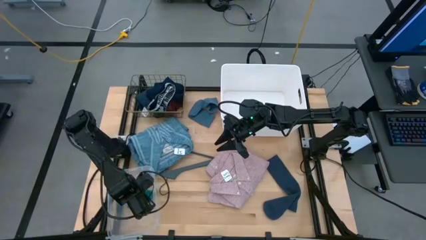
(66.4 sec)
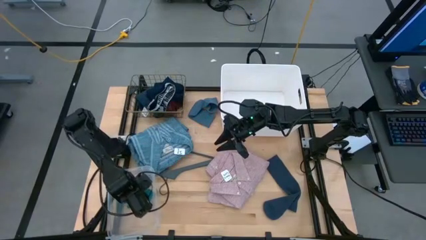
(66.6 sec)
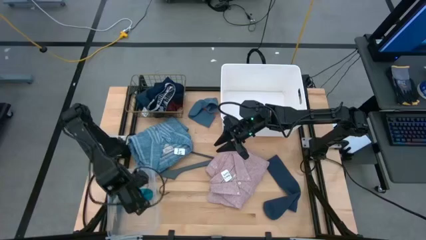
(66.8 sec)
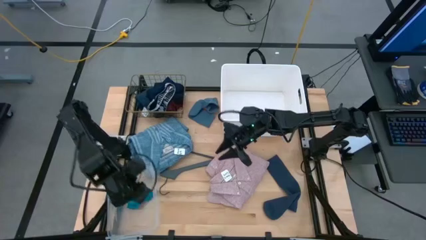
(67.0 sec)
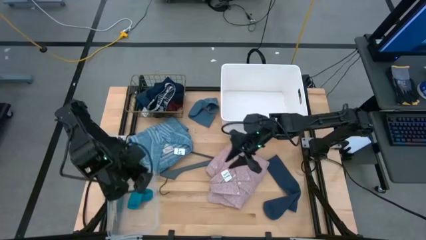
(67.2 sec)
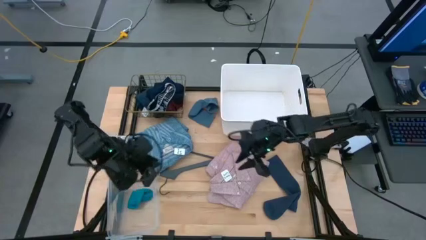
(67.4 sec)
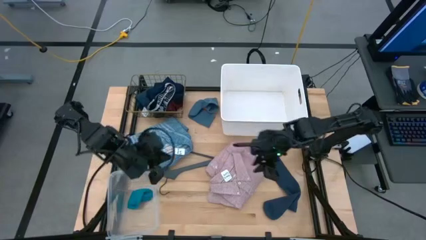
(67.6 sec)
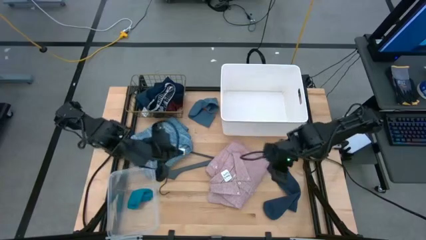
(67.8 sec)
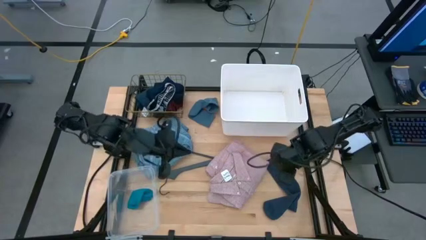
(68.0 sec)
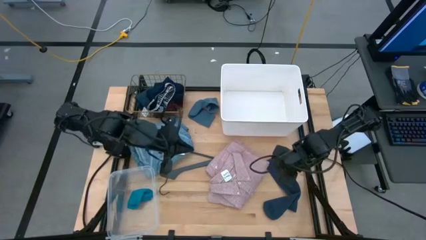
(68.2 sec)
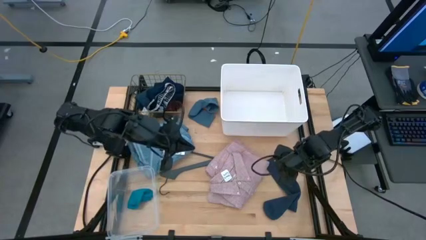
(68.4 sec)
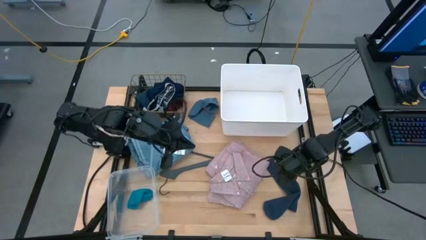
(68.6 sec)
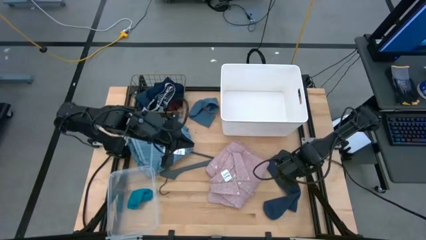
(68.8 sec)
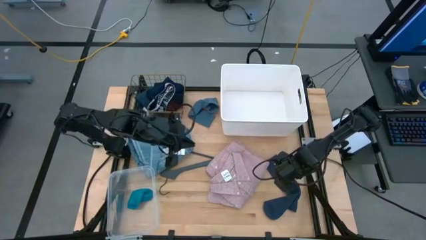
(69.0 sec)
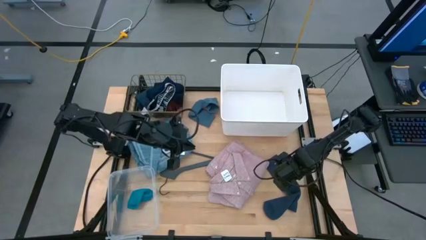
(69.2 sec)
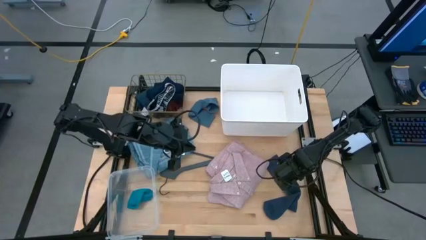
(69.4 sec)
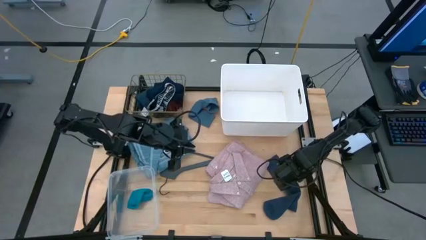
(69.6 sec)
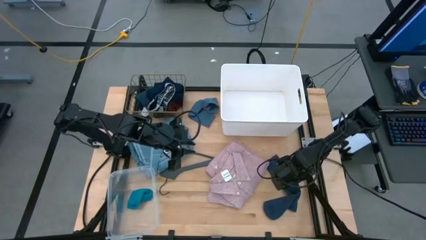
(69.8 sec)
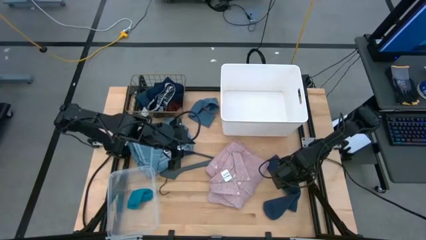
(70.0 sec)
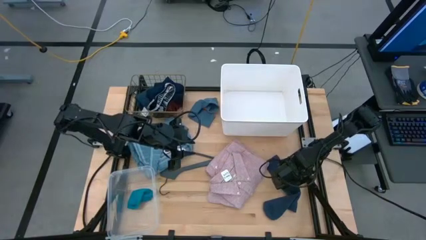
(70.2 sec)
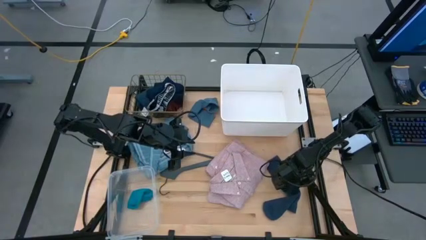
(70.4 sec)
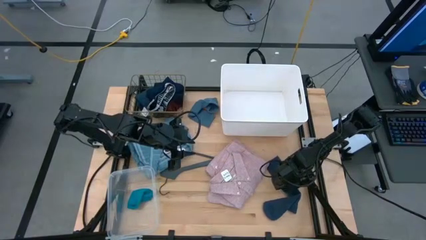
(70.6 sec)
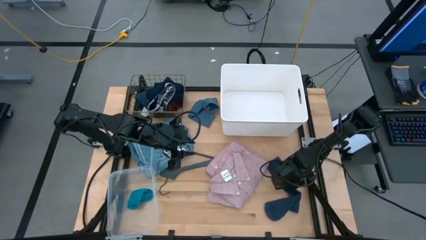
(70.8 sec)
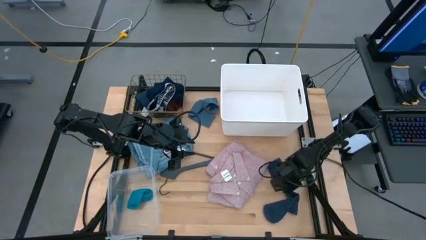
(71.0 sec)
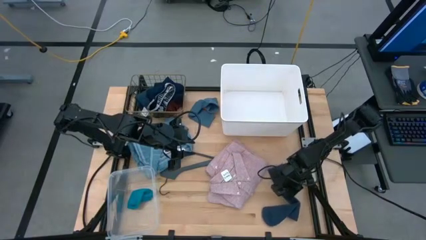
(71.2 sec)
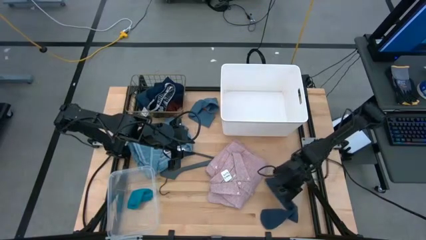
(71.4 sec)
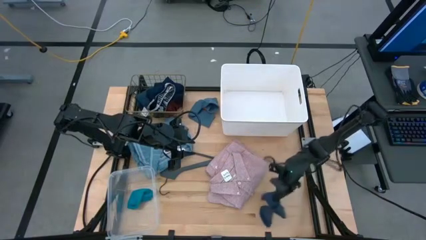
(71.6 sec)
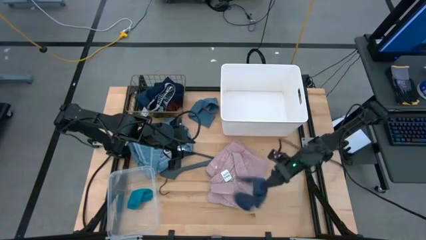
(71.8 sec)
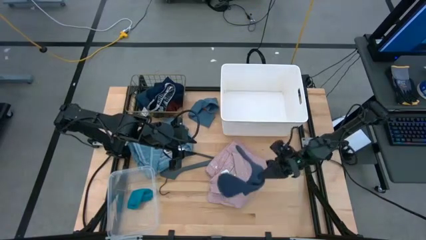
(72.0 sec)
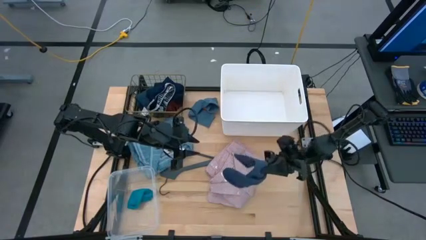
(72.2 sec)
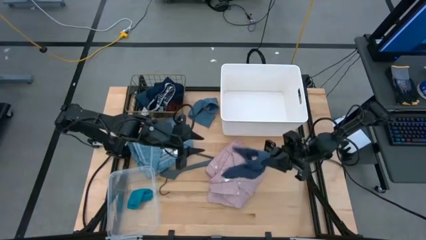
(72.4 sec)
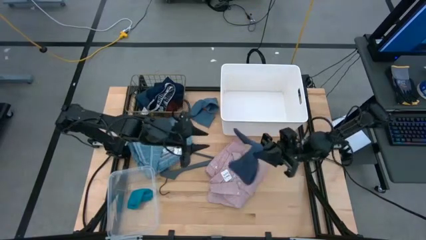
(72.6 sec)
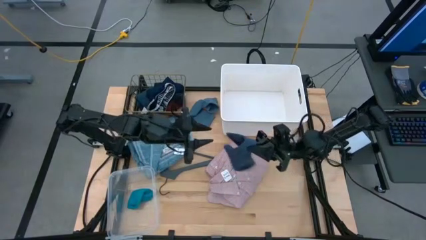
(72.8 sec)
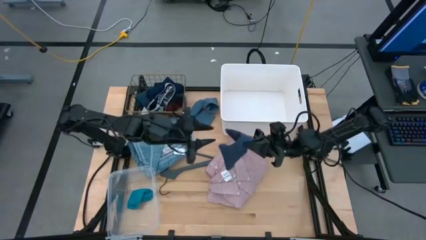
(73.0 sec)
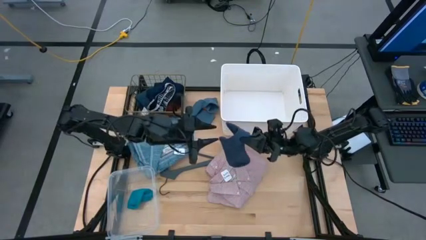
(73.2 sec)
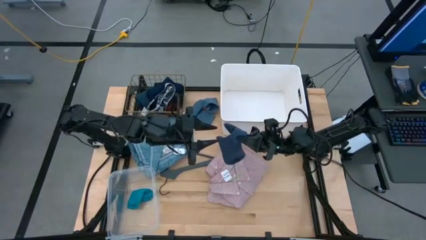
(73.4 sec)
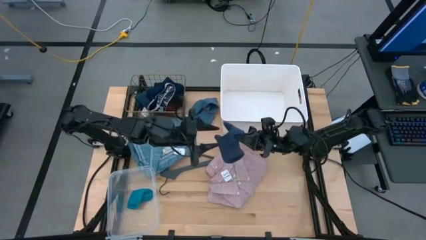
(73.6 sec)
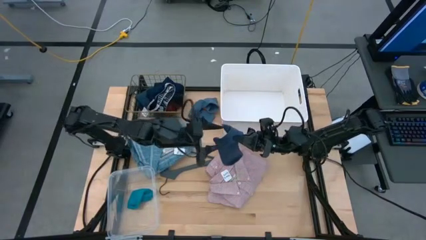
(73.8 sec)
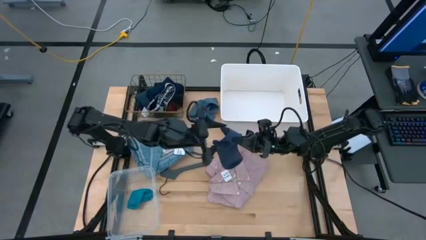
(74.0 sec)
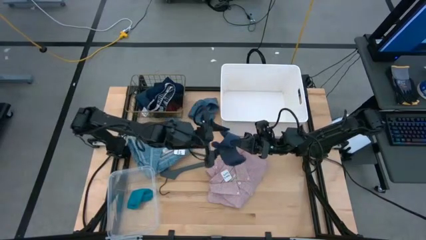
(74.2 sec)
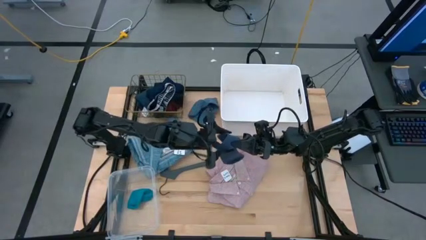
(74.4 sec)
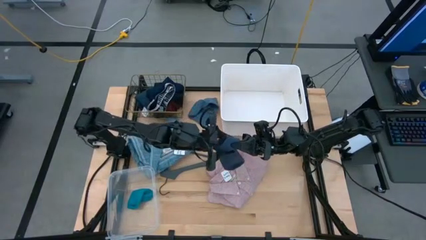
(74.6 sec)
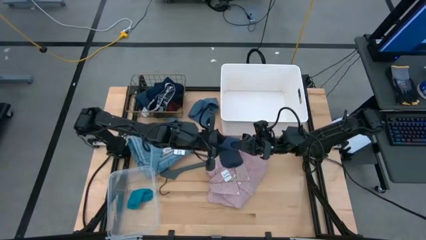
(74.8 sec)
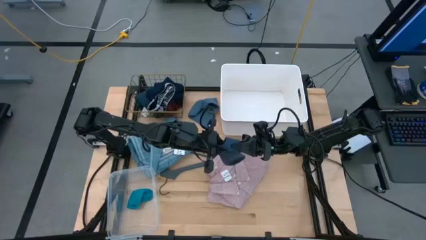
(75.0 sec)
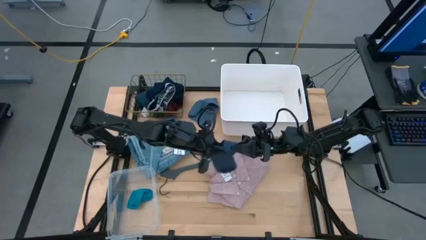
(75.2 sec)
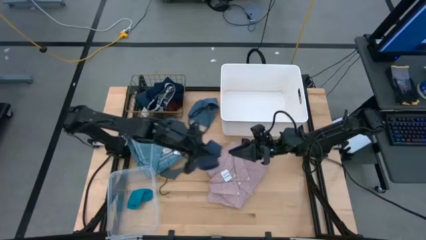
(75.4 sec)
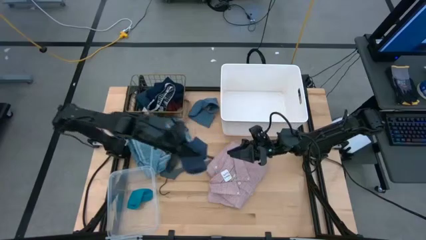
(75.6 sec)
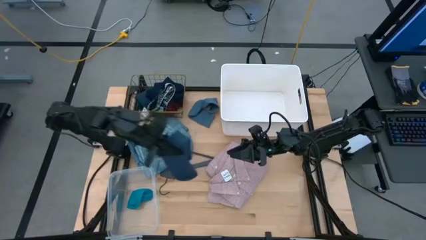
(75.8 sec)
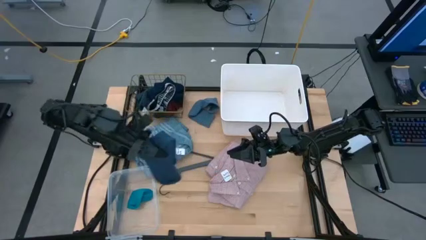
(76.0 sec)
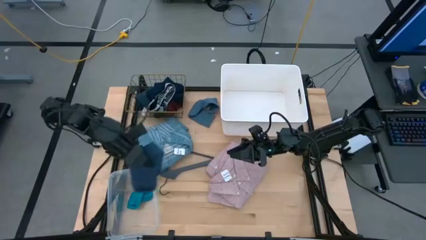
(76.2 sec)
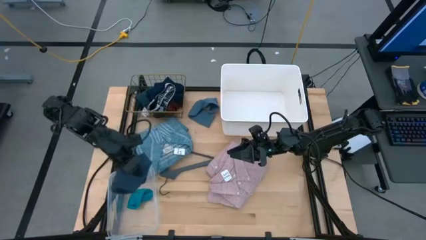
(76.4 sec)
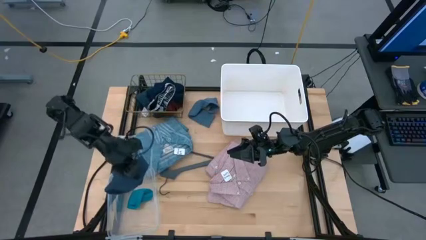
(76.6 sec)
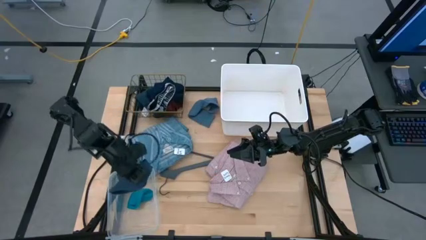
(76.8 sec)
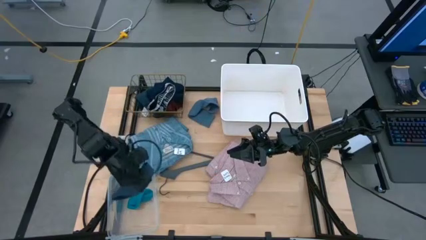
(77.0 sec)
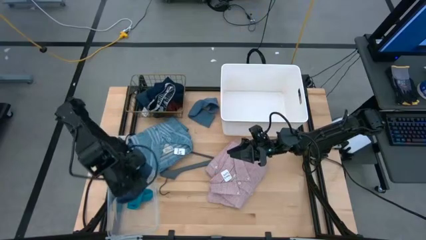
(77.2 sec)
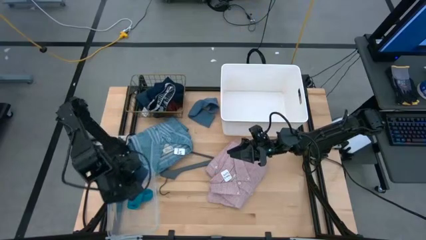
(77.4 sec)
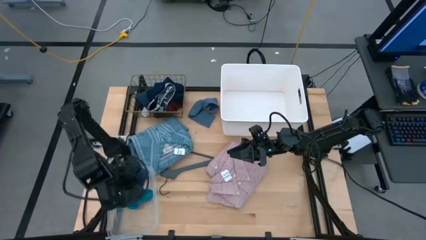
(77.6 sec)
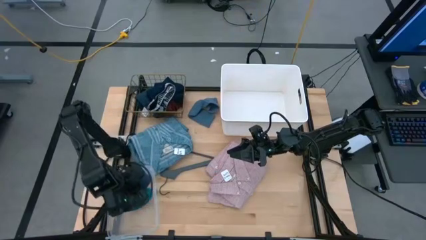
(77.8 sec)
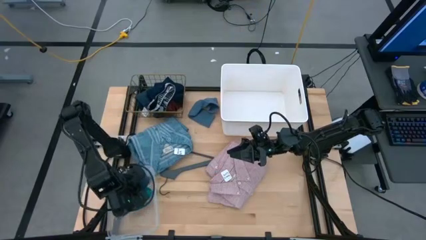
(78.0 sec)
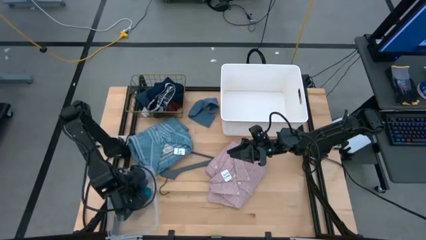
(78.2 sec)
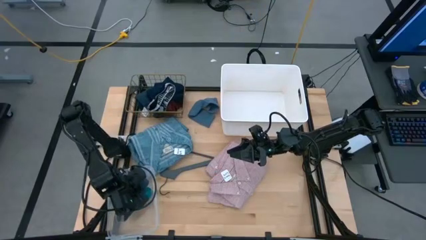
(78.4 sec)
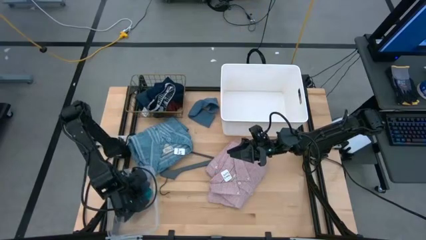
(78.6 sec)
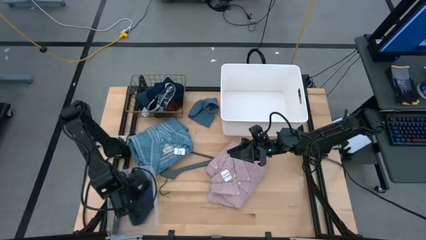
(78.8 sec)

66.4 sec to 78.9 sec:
Task: Pick & Place Cloths
Put the dark blue sock into the transparent bin
